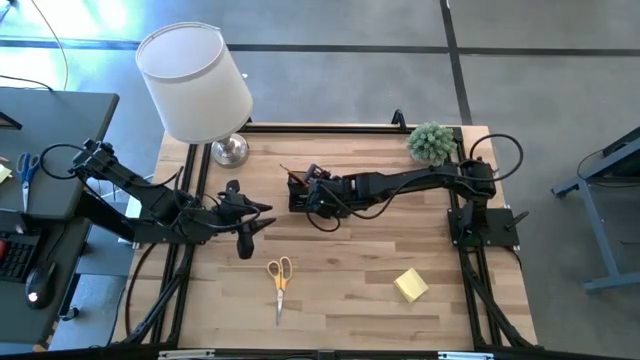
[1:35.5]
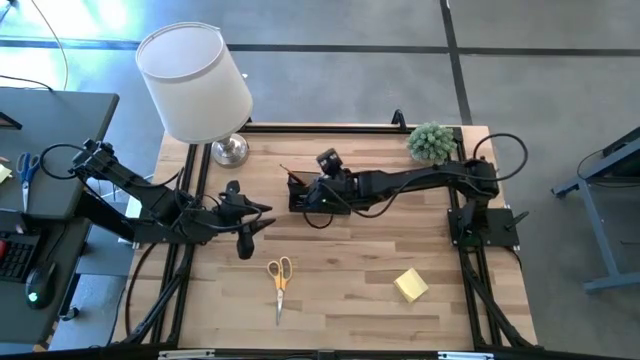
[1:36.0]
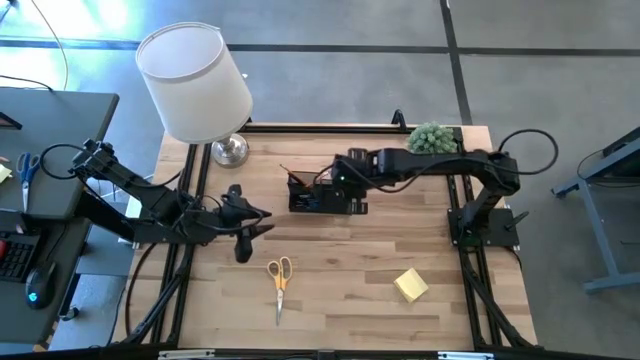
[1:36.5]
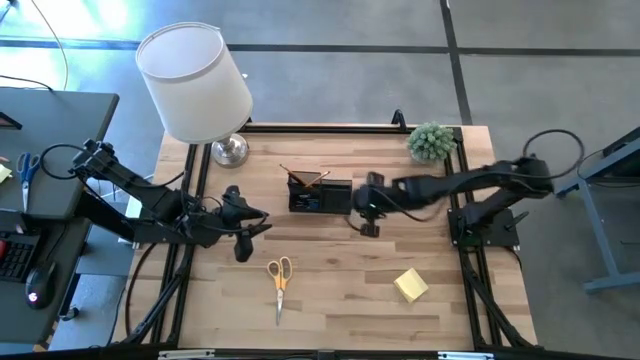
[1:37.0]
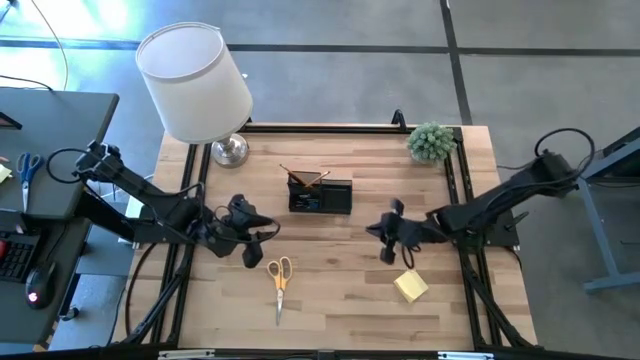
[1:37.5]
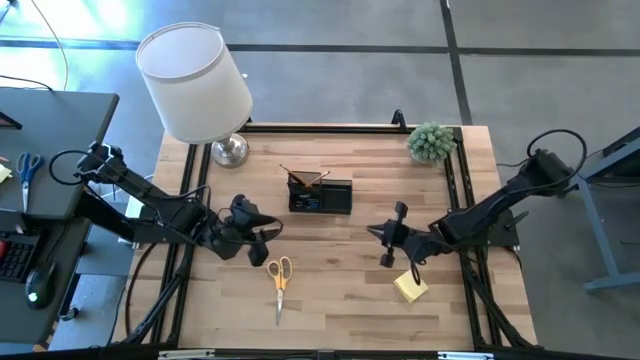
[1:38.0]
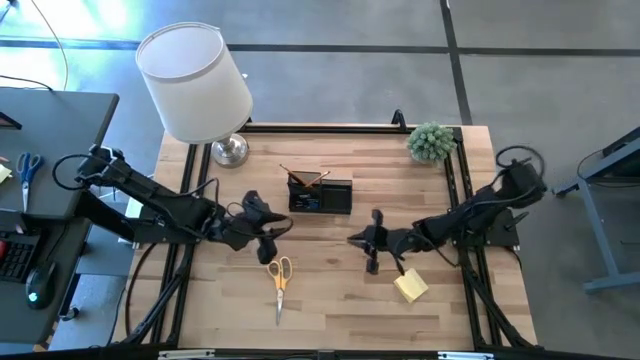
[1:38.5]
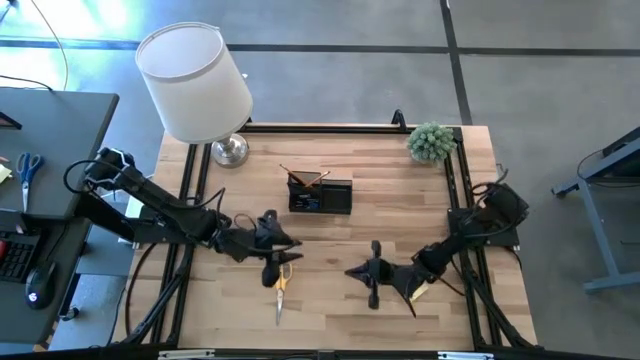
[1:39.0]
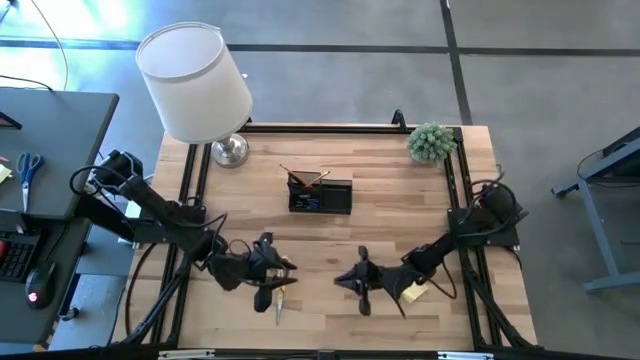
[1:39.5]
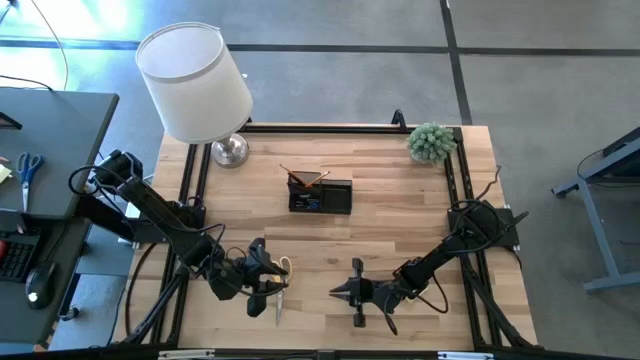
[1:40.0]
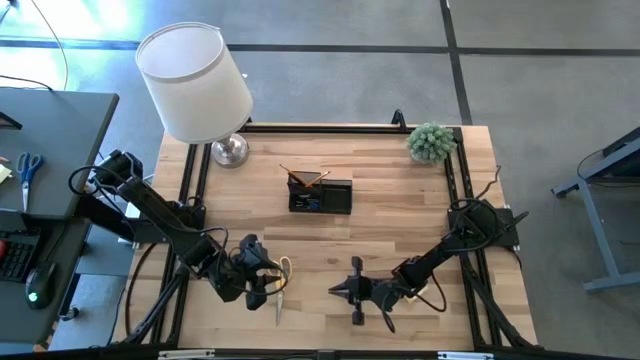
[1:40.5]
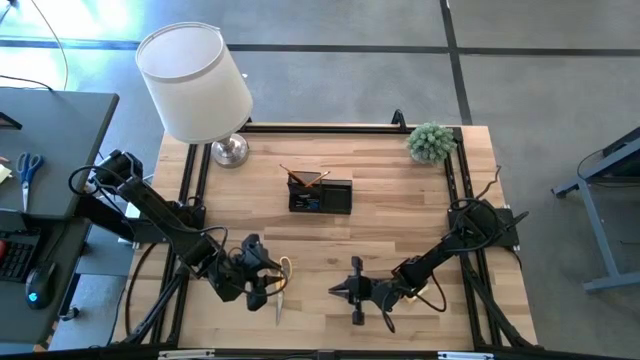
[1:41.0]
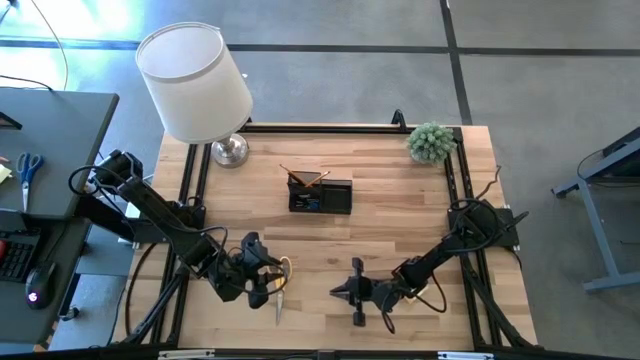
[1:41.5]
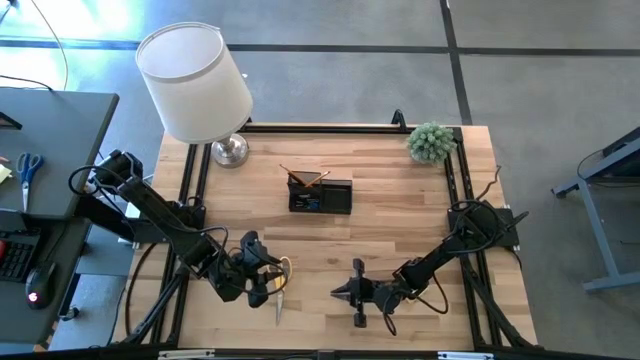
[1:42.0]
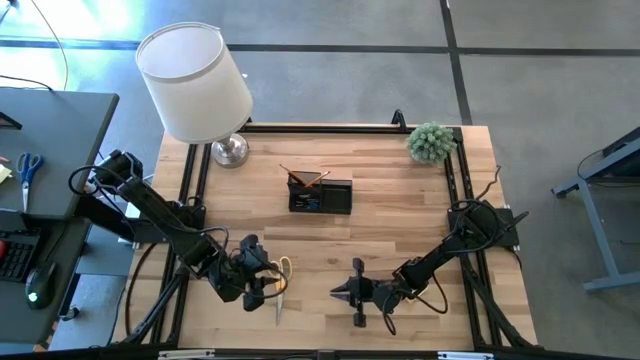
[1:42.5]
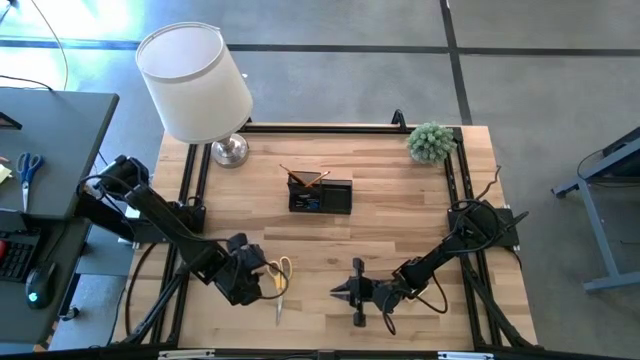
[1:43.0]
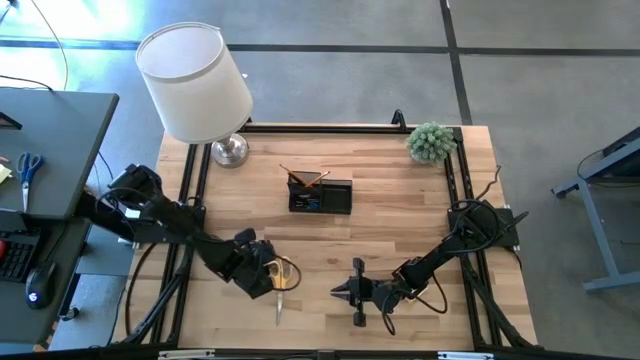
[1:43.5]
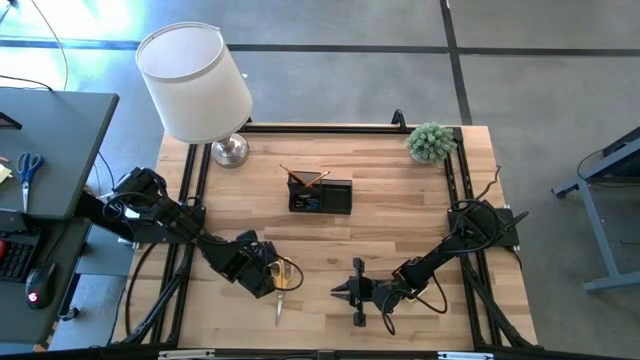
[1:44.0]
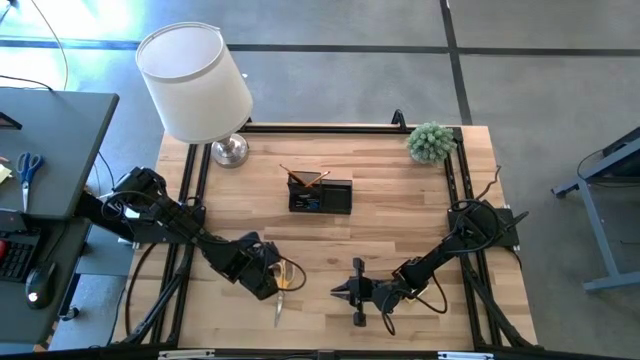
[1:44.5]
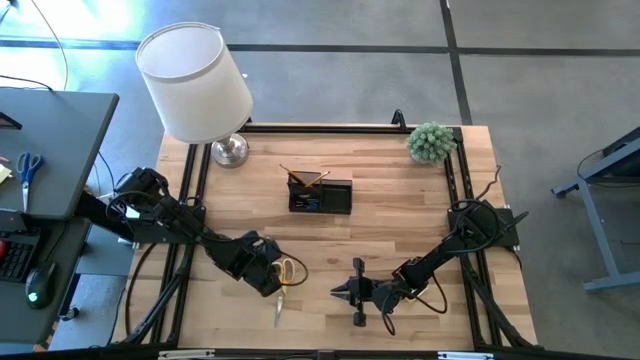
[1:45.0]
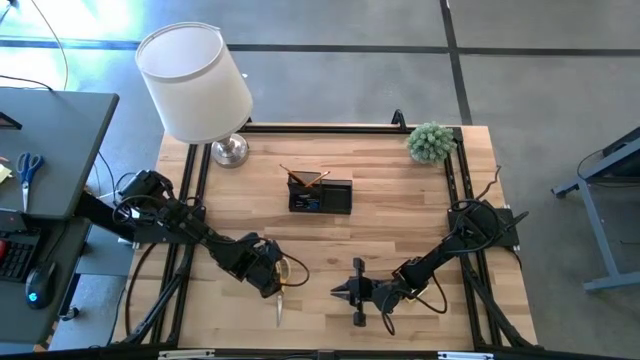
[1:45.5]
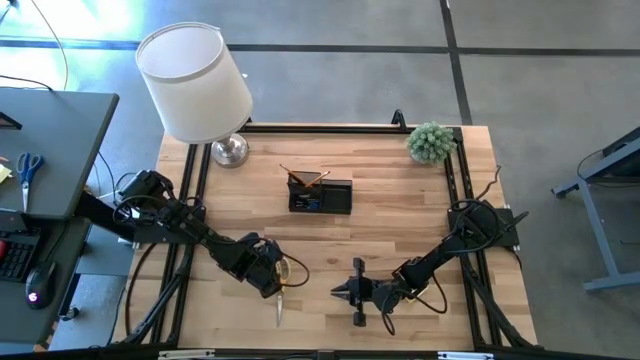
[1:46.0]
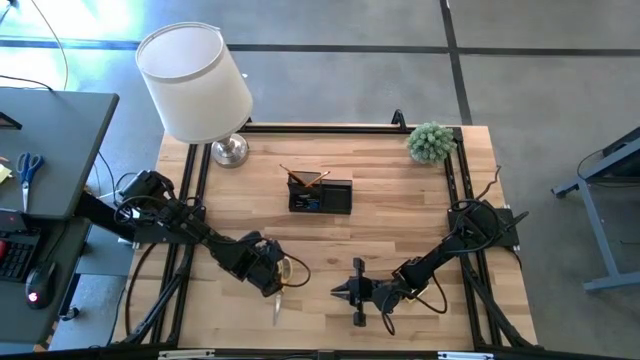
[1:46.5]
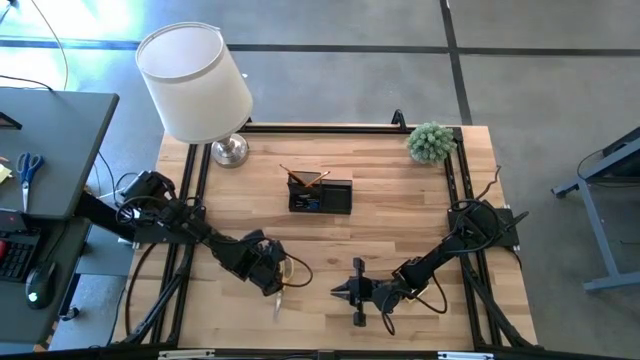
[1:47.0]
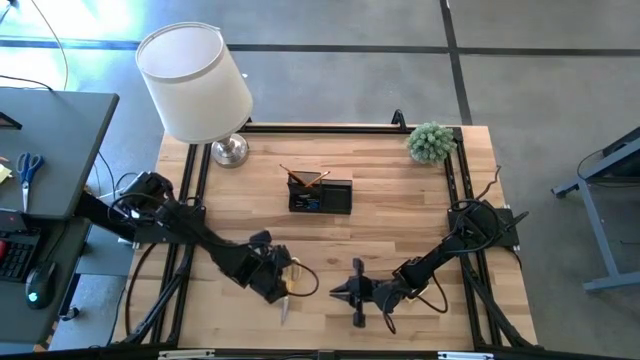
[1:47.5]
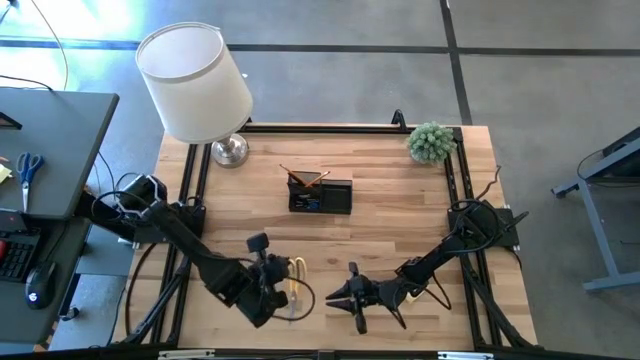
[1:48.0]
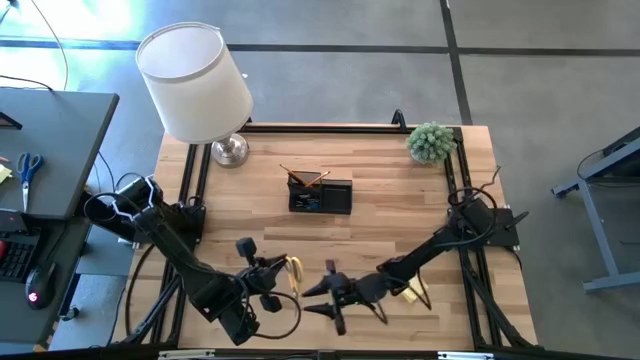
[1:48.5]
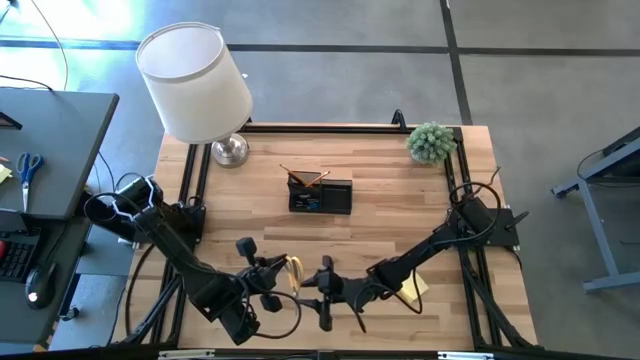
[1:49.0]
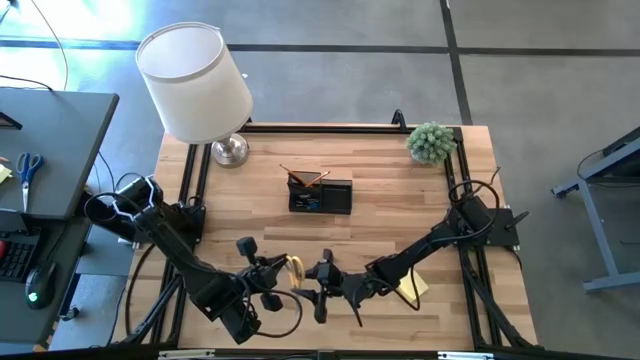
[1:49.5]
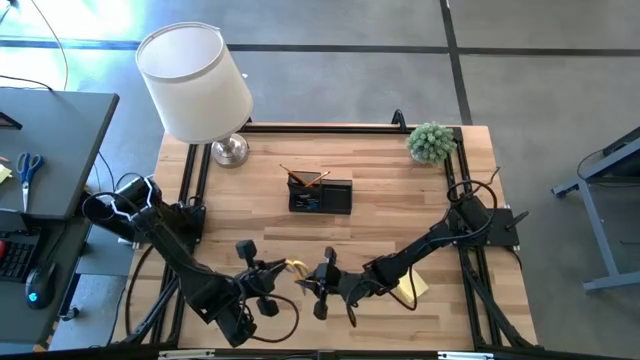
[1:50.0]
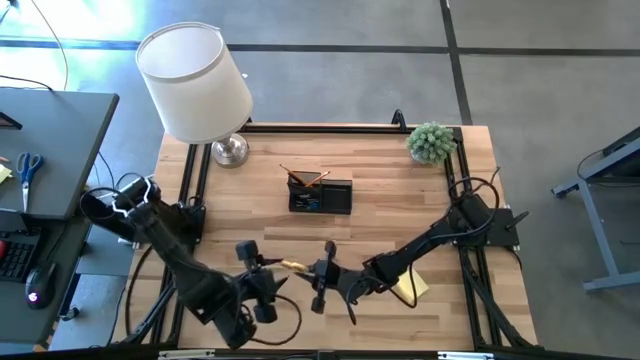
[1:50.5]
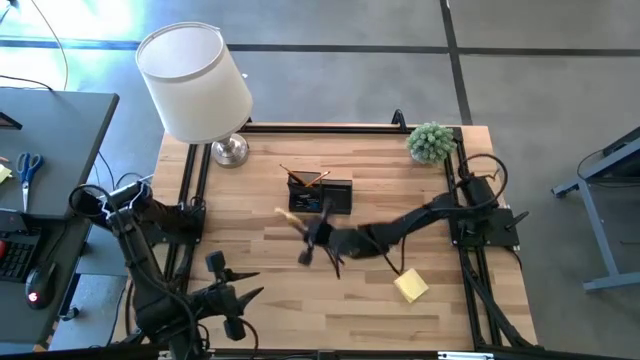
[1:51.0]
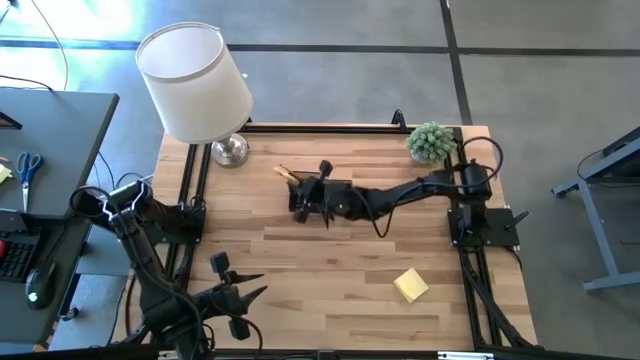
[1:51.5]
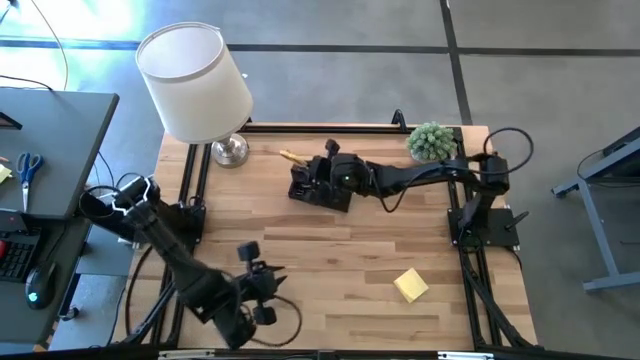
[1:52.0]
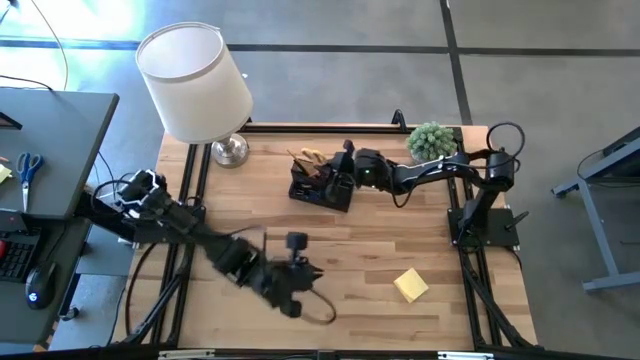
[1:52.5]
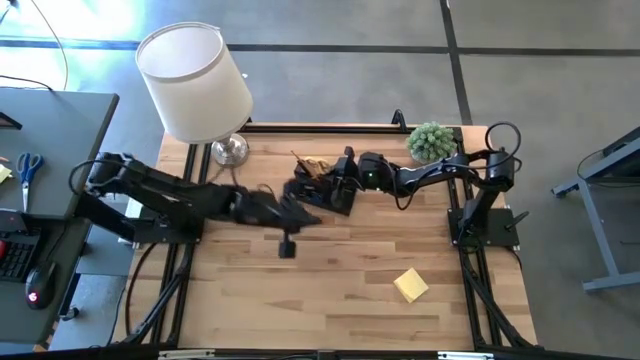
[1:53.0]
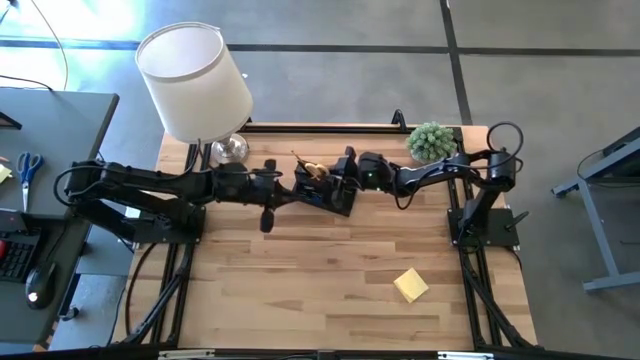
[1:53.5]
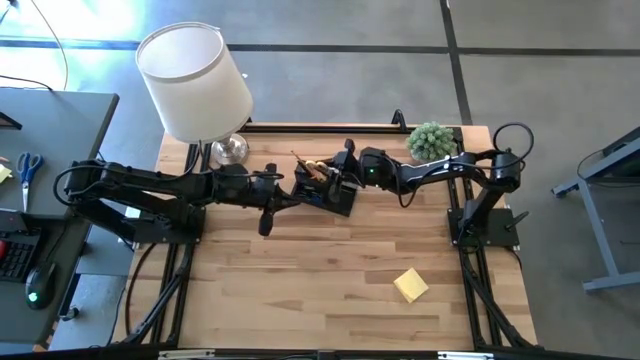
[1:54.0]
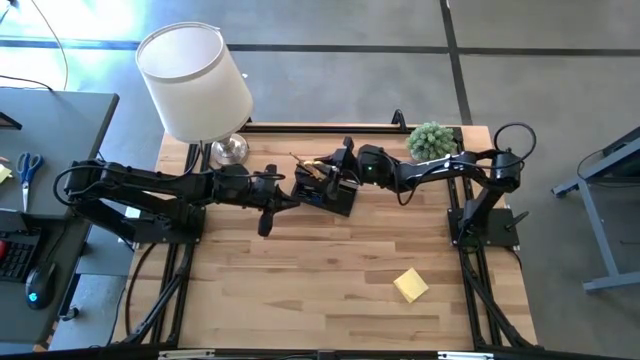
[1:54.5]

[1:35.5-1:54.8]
Task: Pick and place office supplies into organizer
Put the yellow scissors into the desk organizer

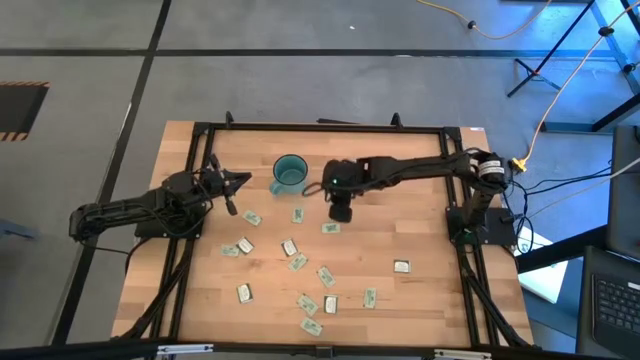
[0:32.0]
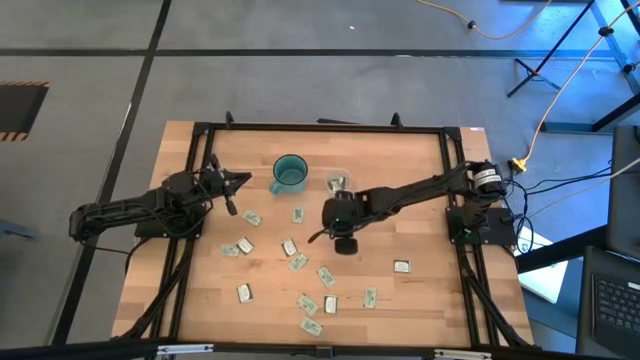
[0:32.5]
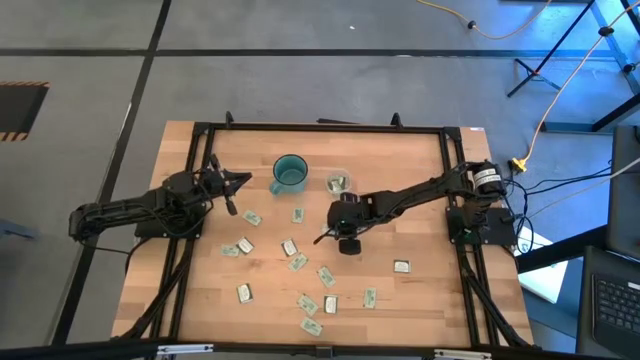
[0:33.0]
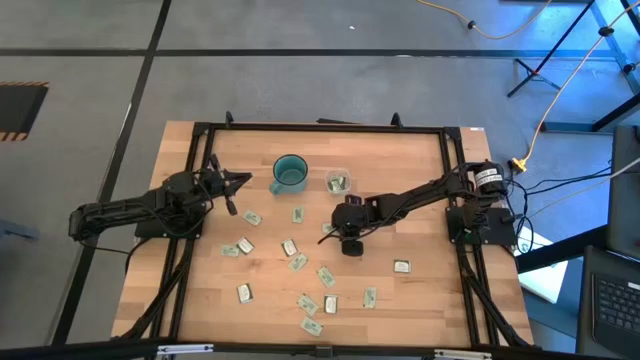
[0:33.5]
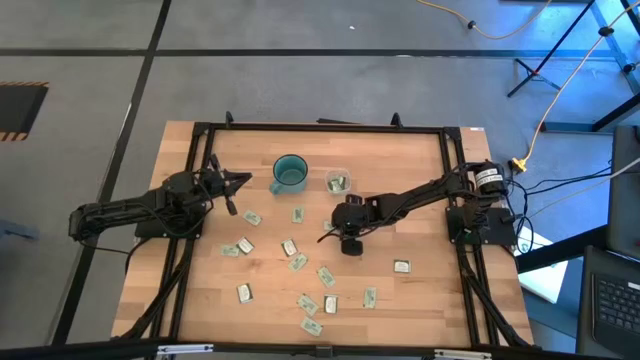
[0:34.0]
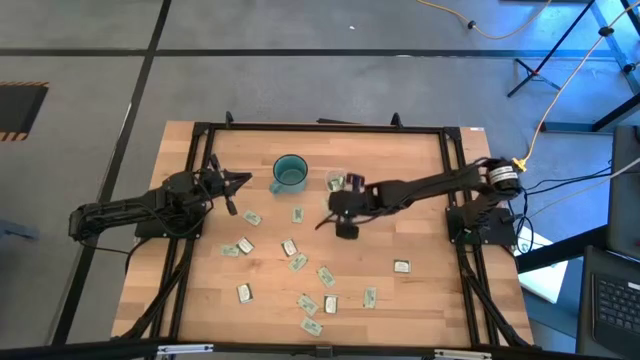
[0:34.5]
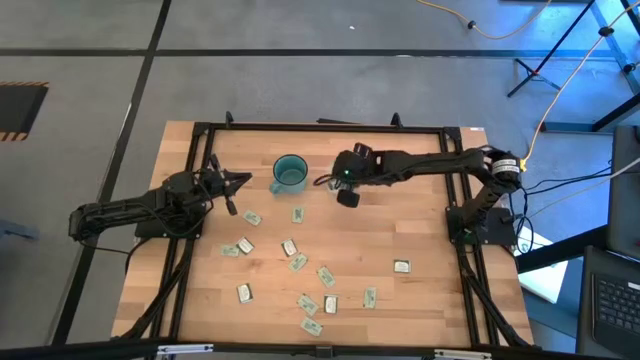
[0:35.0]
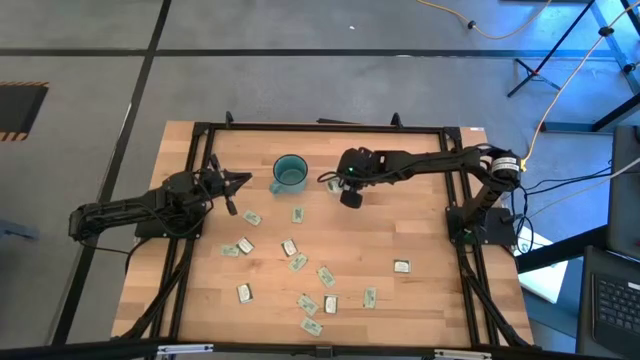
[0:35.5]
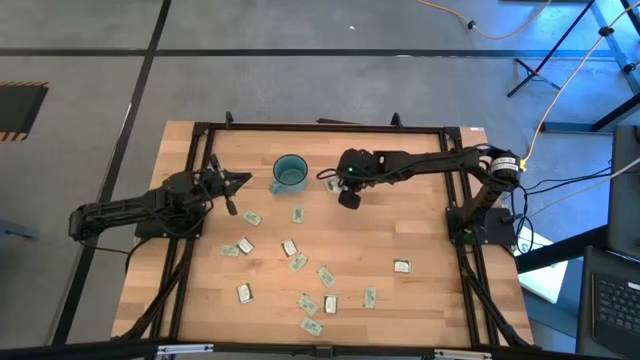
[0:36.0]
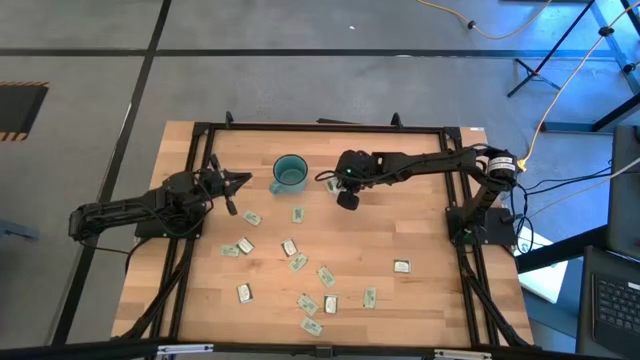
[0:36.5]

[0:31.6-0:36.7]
Task: Pick and place items into bin
Put the white stevia packet into the transparent bin
